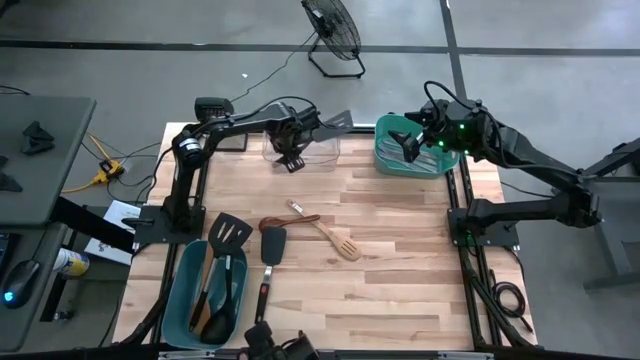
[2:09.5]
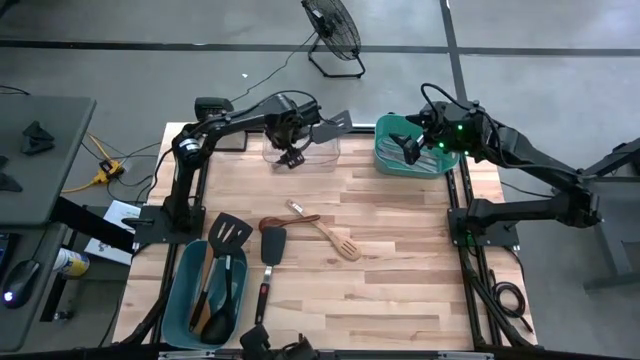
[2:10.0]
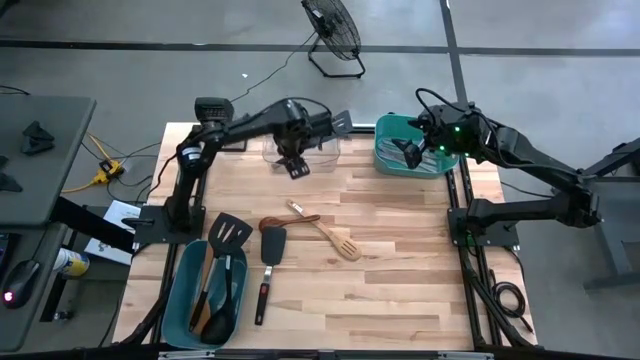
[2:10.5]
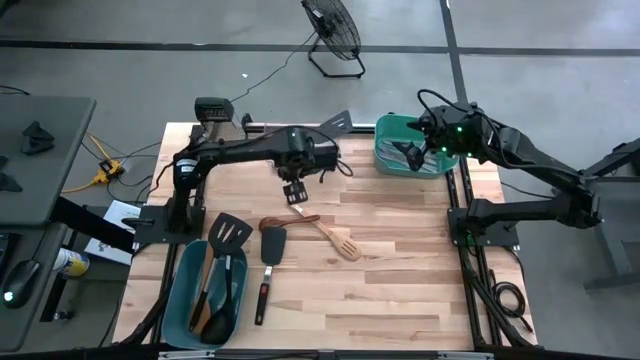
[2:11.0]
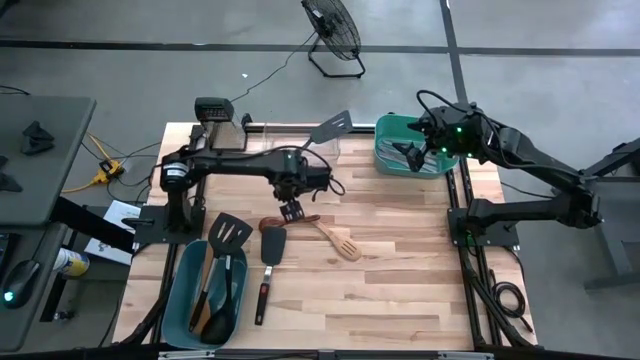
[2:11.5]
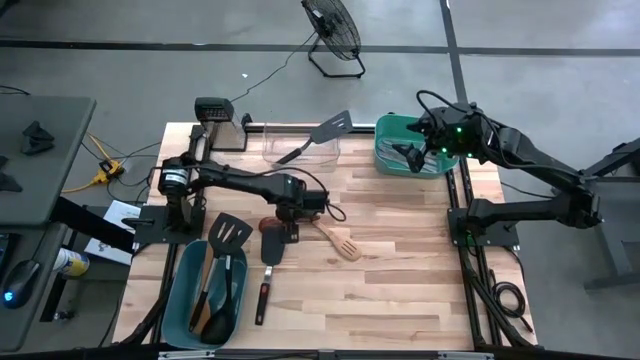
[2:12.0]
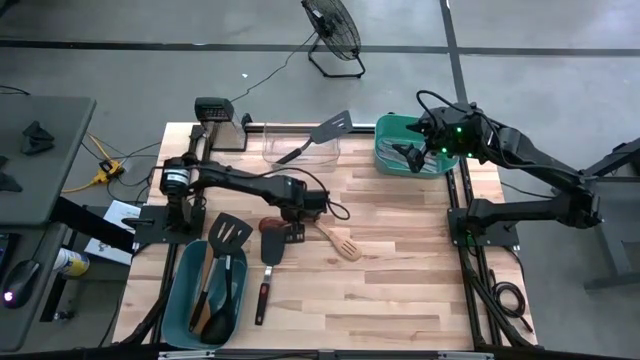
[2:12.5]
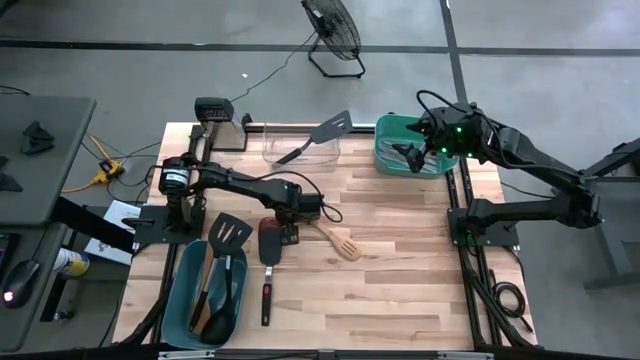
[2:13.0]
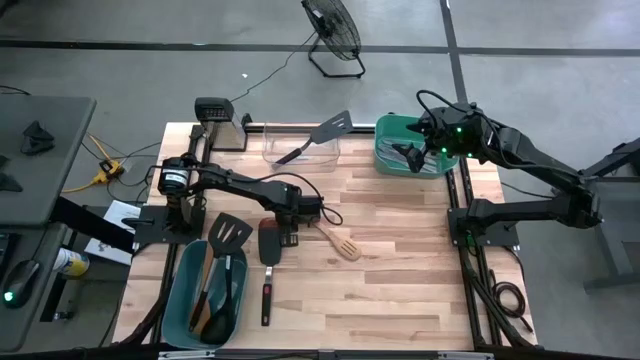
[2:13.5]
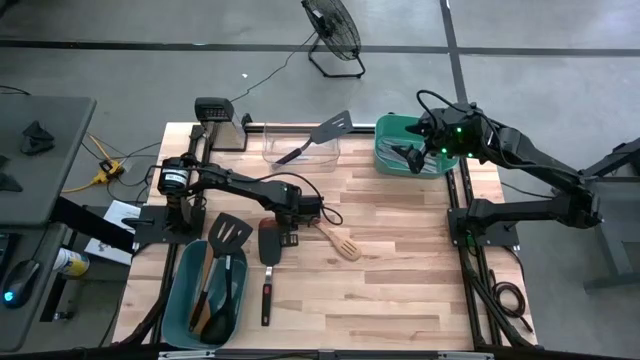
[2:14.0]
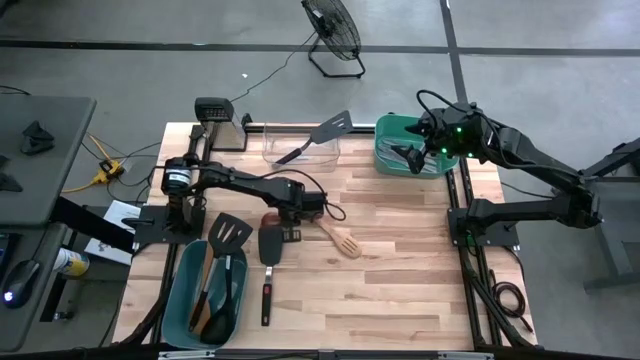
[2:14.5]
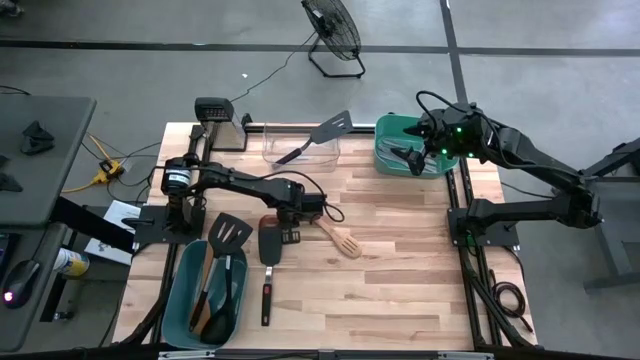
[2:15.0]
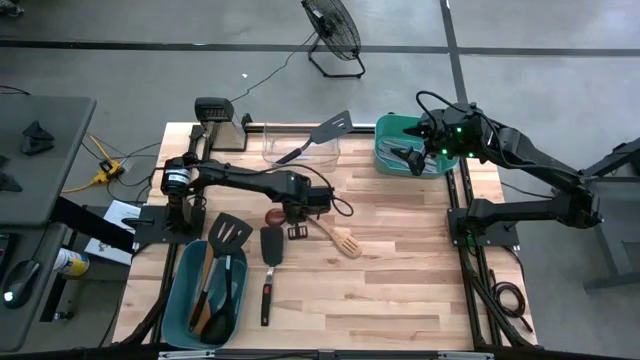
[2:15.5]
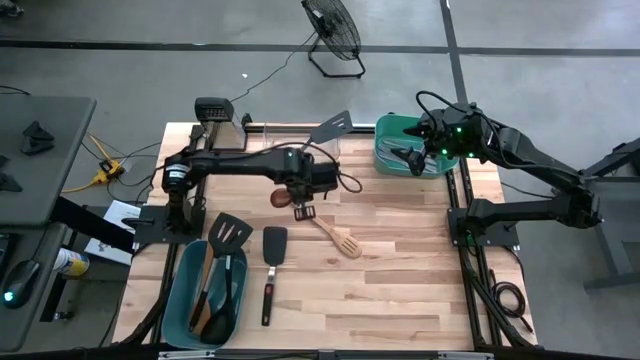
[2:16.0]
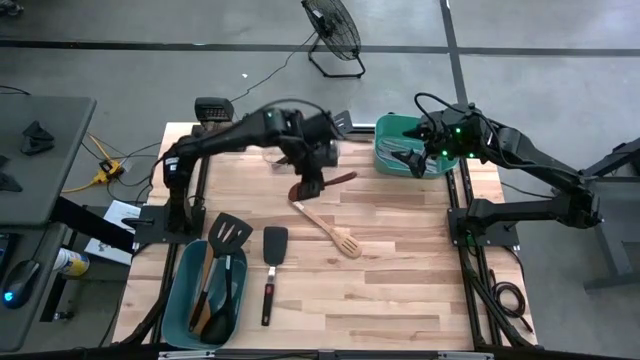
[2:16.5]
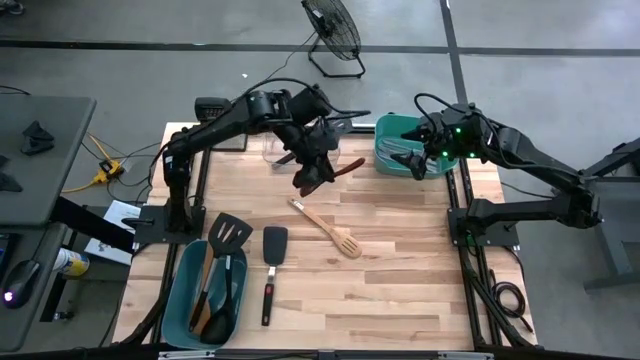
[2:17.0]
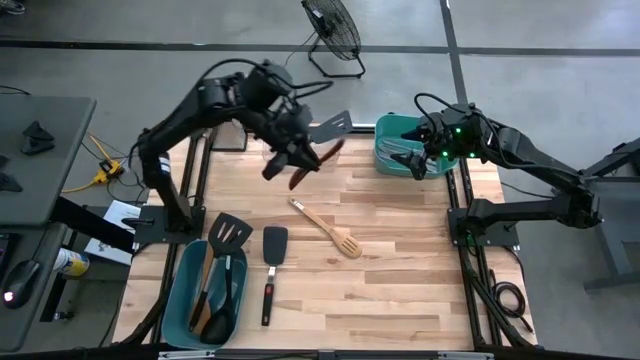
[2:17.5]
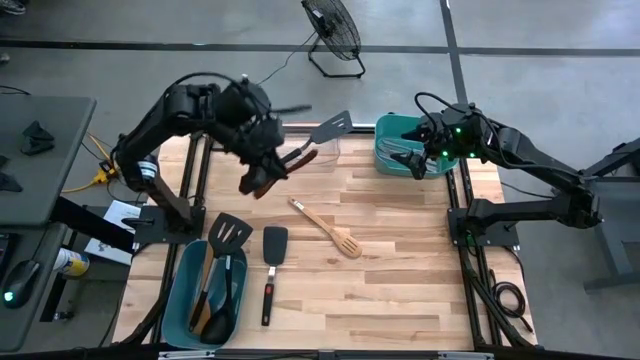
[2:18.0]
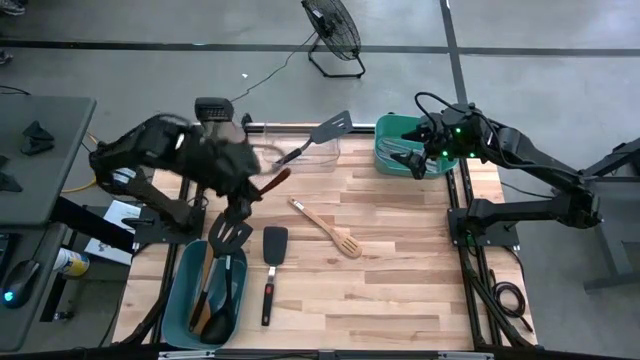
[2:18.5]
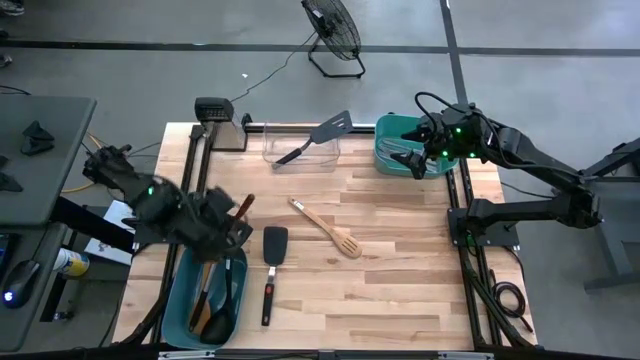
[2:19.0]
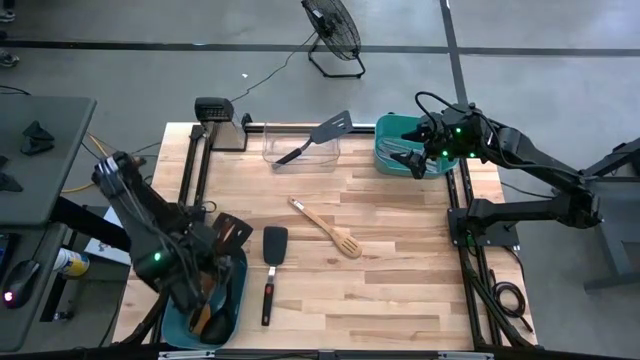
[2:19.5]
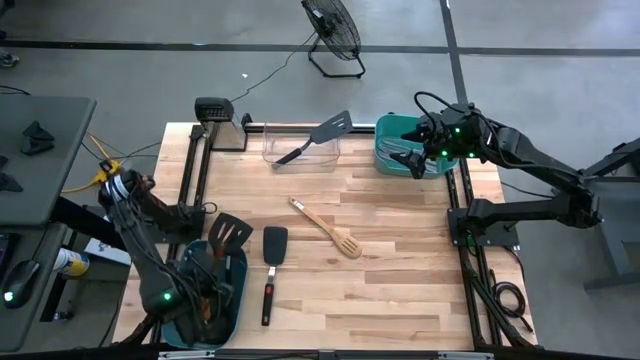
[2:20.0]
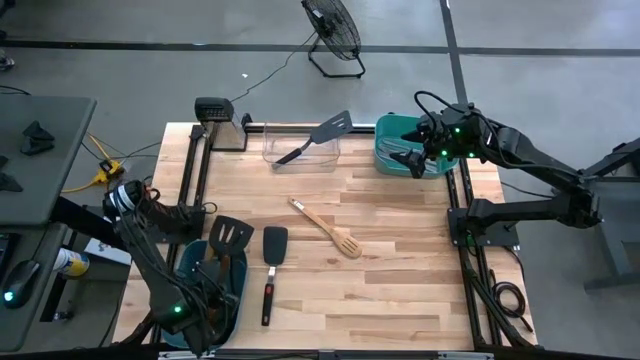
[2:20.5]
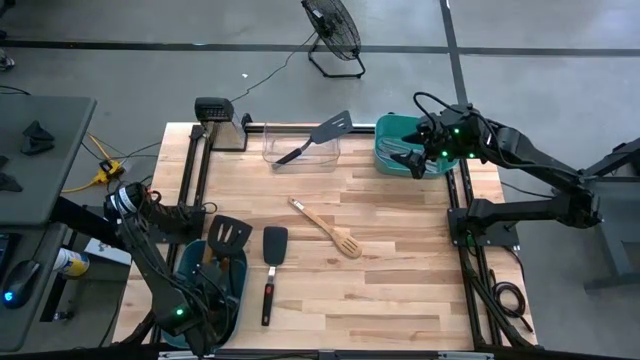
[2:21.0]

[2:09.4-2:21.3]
Task: Pick & Place Kitchen Items
Put the wooden spoon into the blue bin

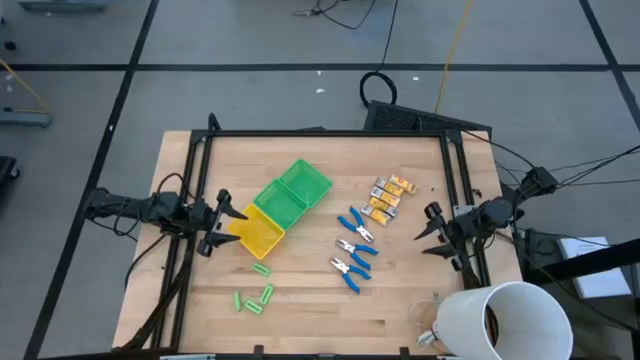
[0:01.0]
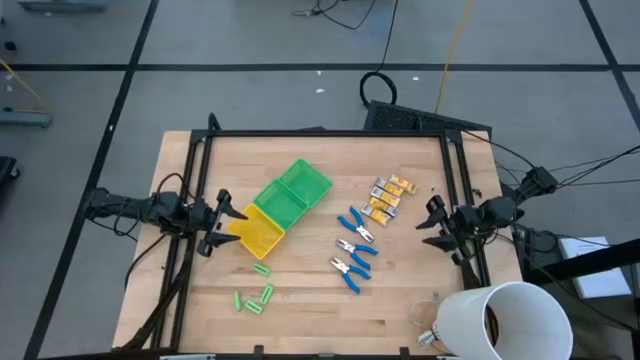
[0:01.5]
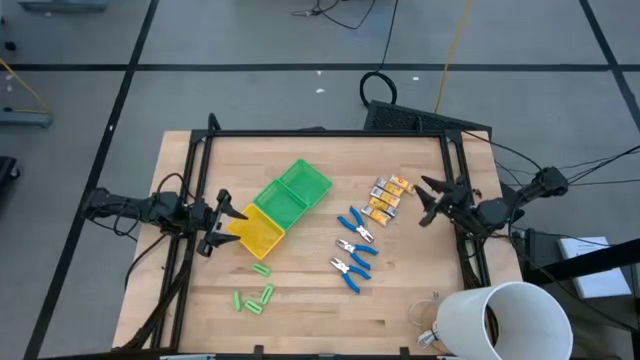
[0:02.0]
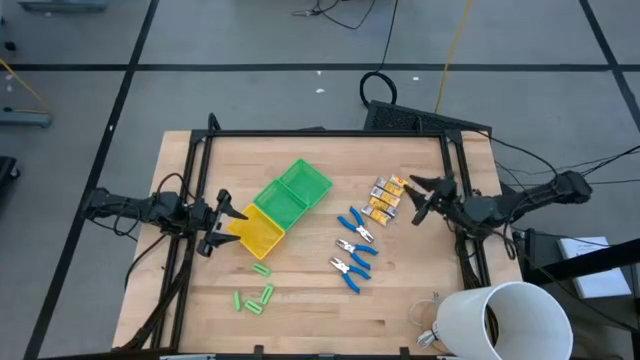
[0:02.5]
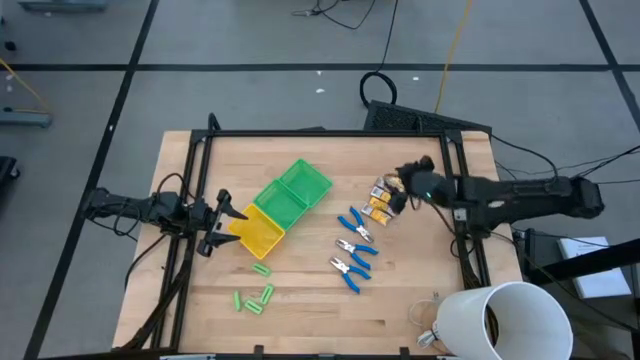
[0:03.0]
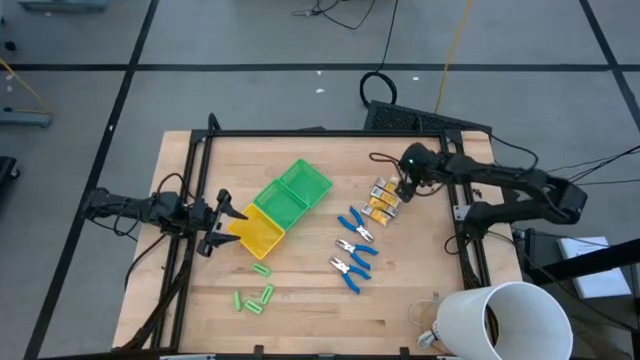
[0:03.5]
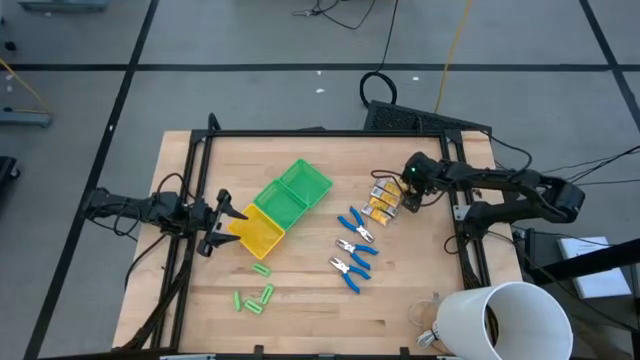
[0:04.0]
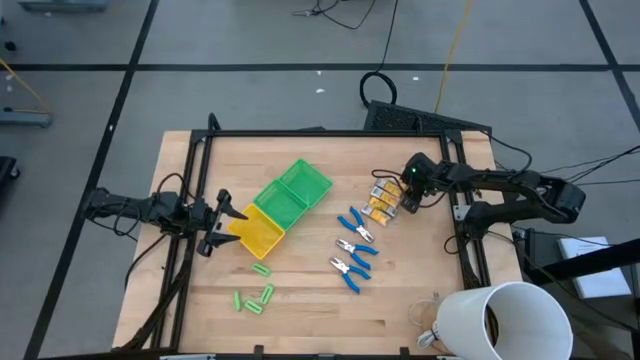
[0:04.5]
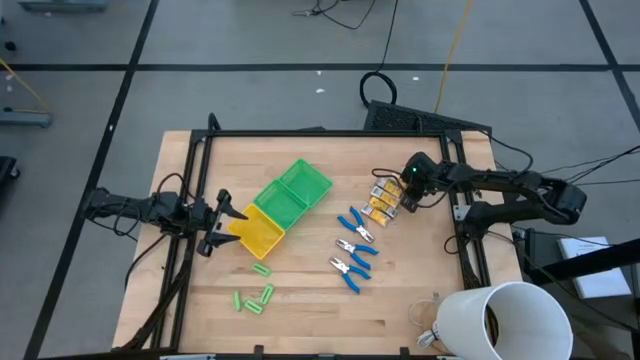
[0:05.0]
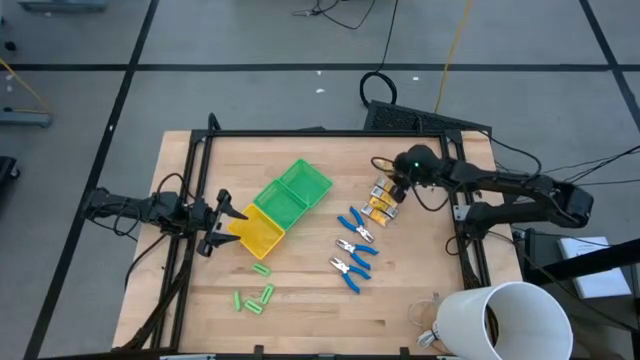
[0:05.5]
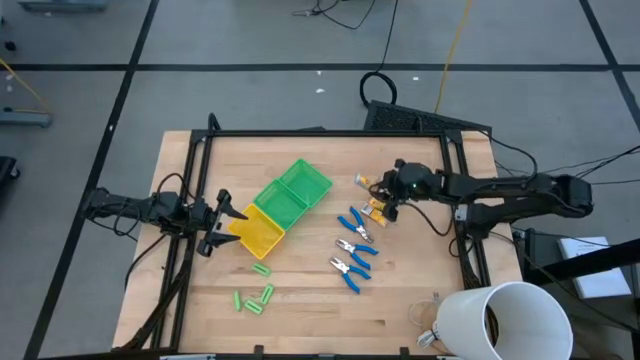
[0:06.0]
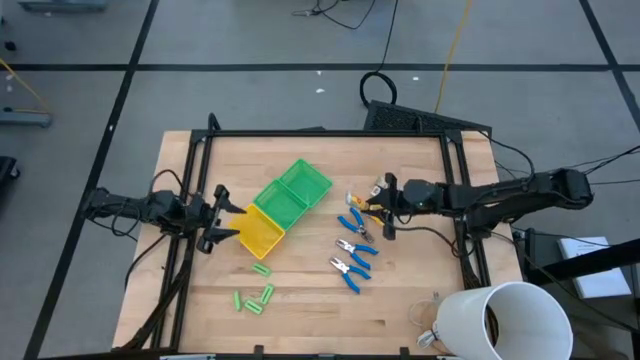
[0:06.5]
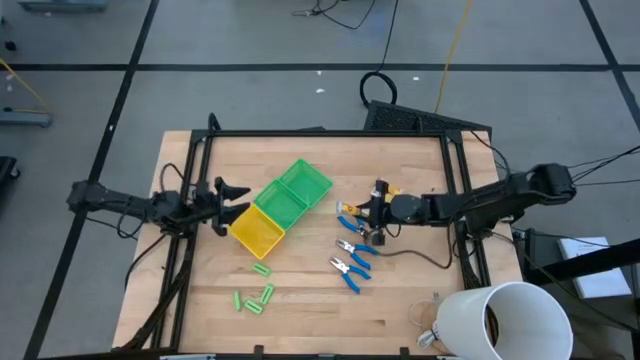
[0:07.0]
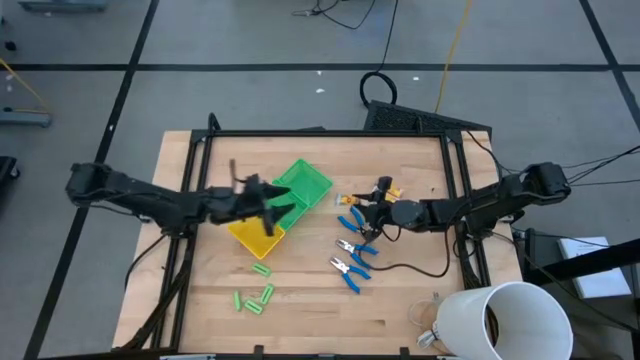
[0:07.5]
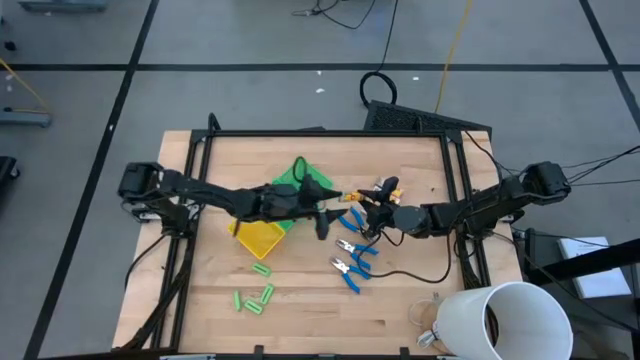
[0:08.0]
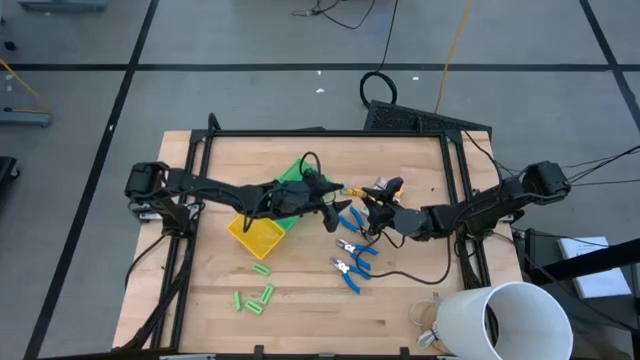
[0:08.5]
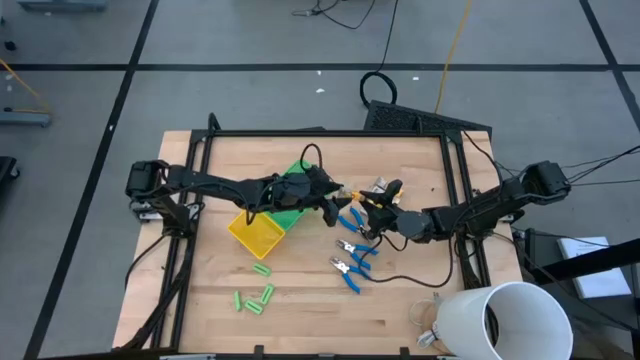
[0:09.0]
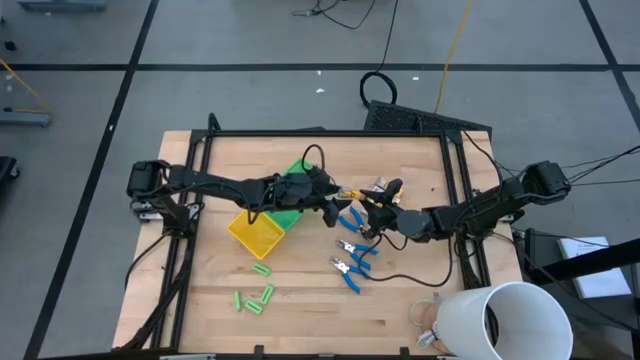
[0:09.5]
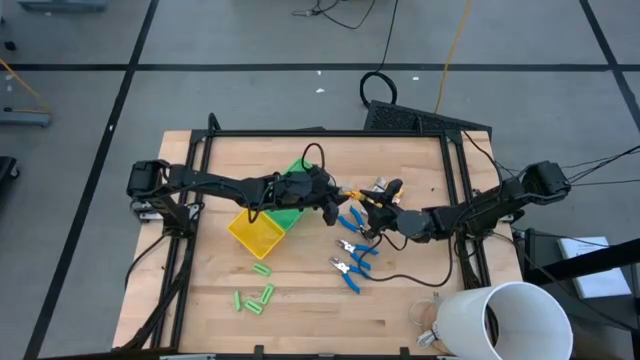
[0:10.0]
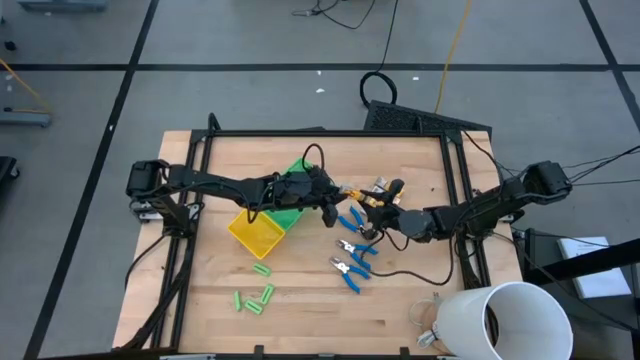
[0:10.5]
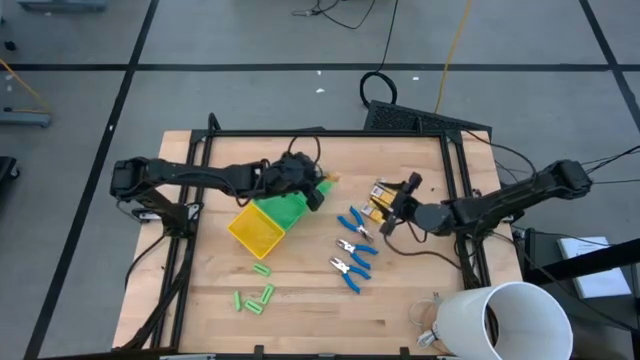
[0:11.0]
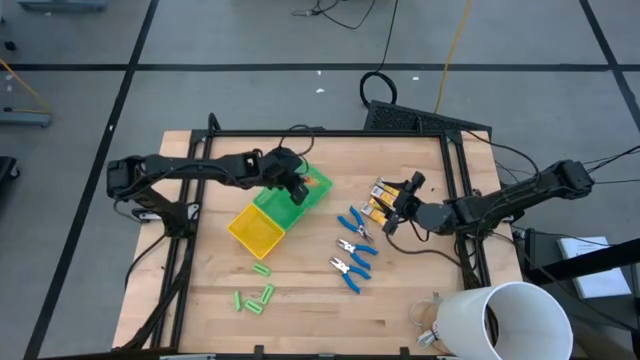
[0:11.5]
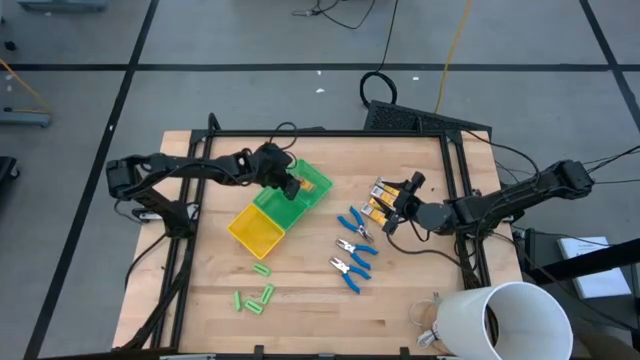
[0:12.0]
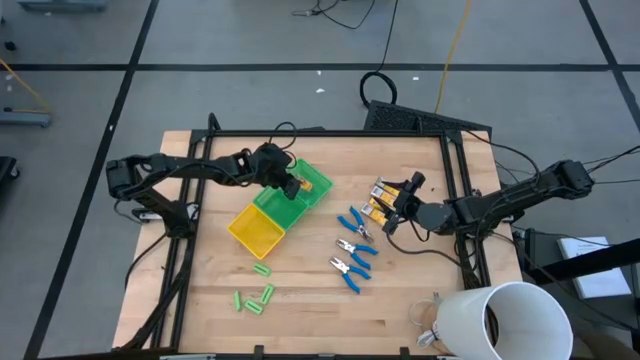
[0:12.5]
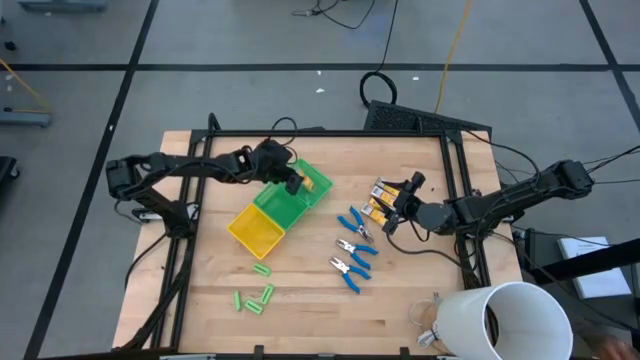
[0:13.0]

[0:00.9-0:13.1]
Task: Pick & Place School Supplies
Put the crayon box into the top green bin
